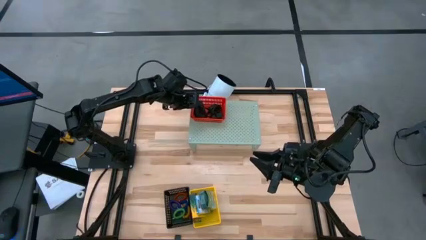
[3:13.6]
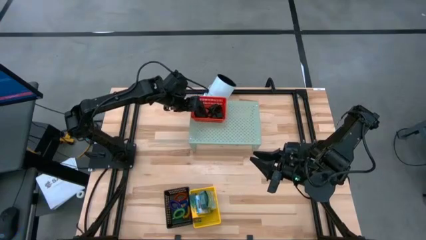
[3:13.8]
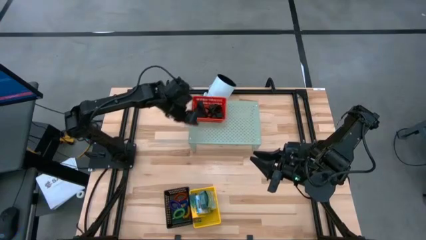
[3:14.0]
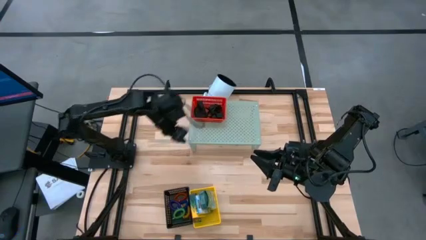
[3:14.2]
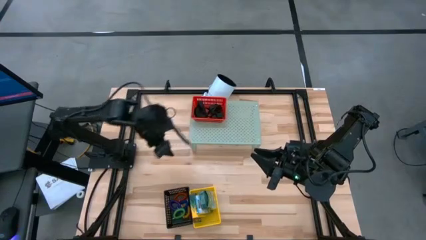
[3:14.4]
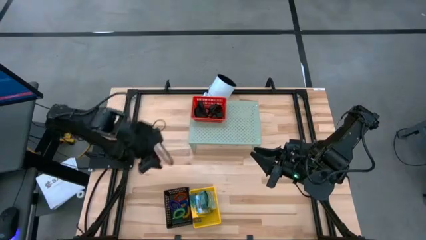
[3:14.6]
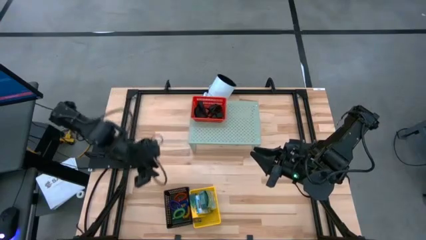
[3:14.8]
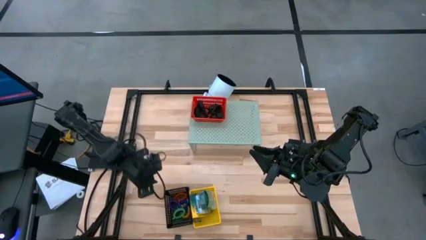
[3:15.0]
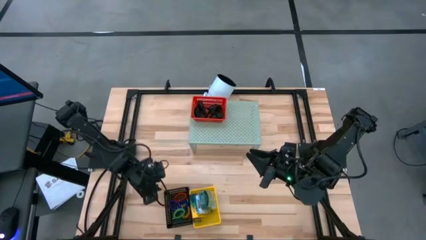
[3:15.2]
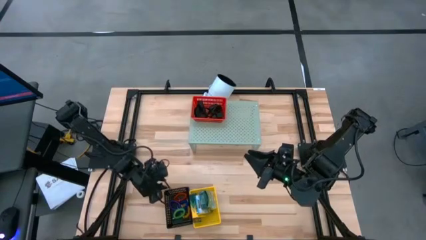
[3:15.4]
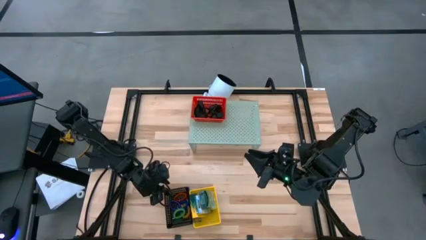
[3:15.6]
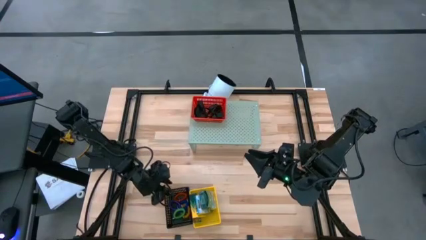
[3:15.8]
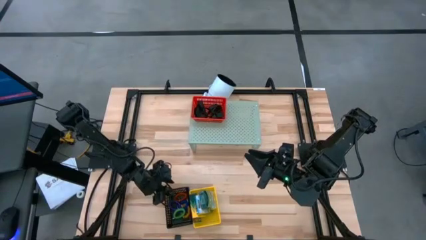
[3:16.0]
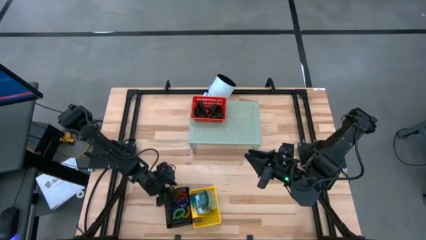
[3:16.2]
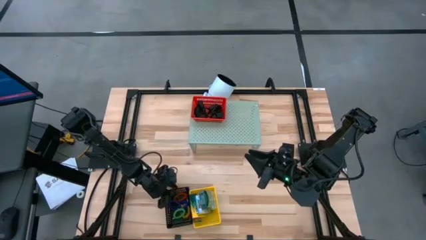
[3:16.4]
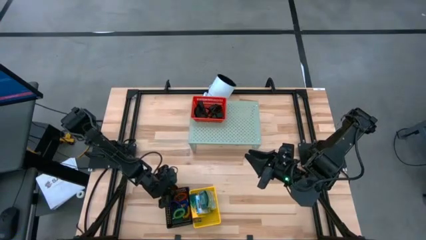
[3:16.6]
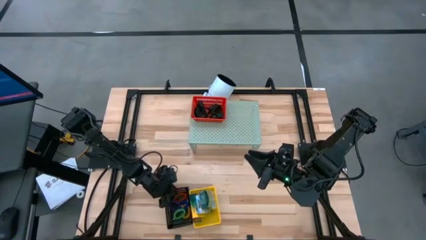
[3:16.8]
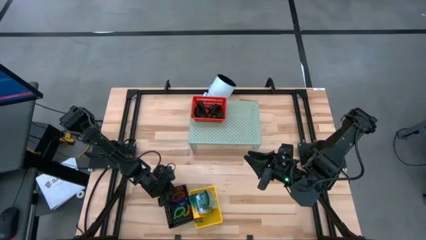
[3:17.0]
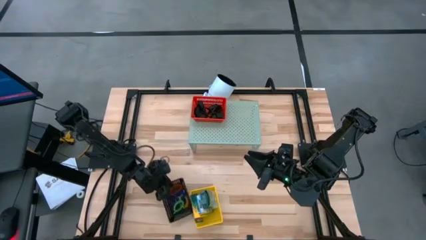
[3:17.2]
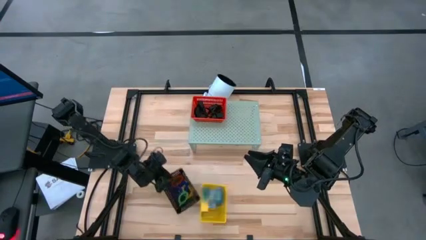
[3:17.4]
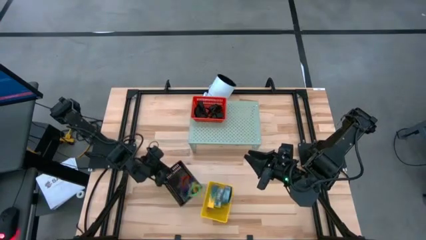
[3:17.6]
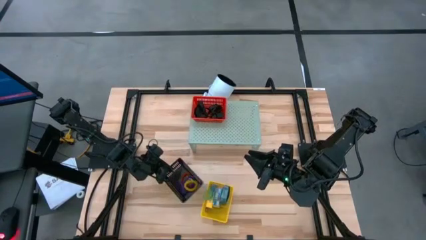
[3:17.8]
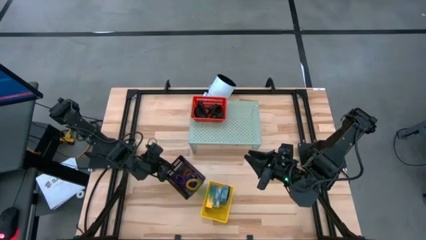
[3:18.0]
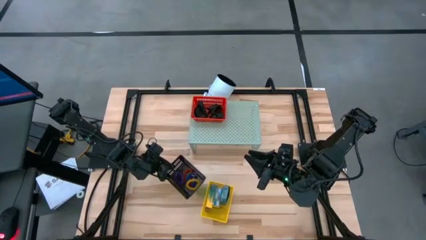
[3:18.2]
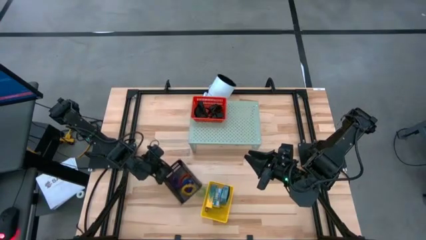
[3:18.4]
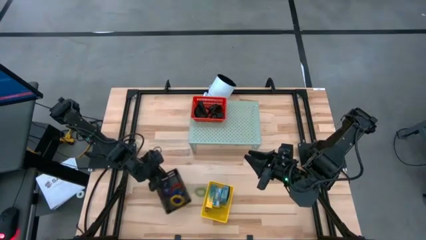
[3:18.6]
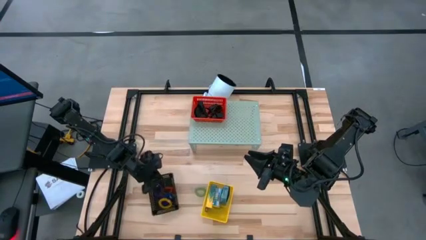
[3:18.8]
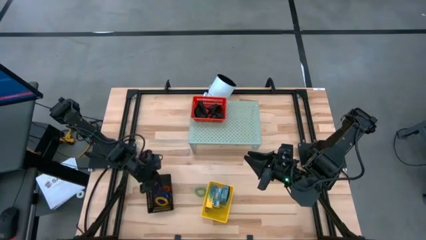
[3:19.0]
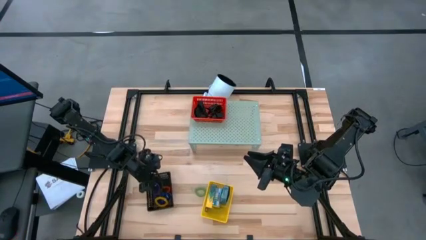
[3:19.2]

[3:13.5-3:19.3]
Task: Pick & Place Office Desk Supplies
Put the black bin on the shelf

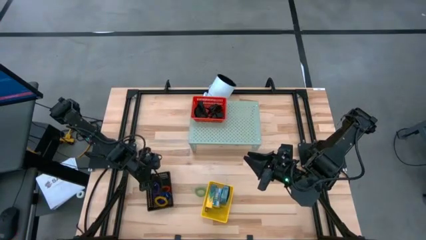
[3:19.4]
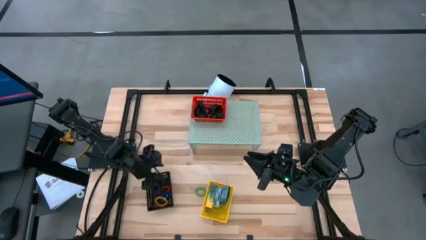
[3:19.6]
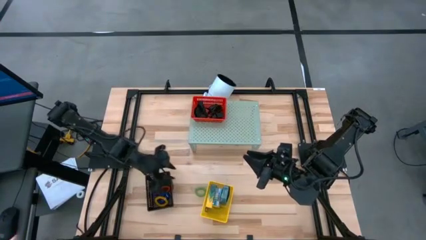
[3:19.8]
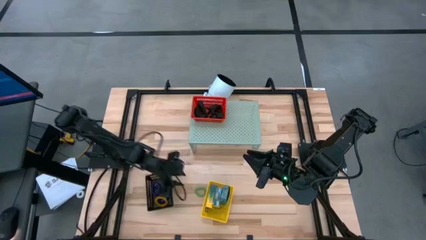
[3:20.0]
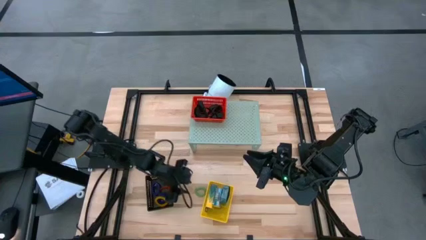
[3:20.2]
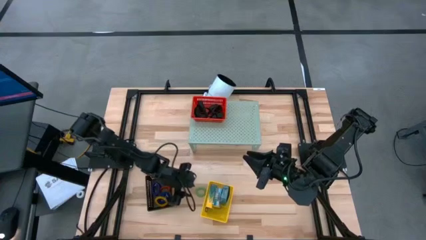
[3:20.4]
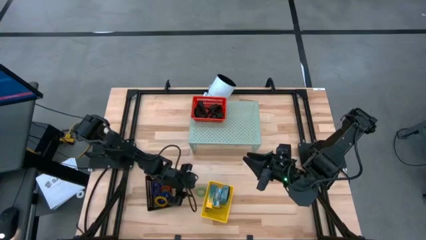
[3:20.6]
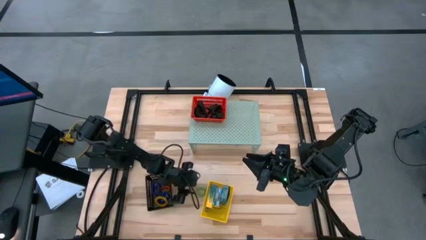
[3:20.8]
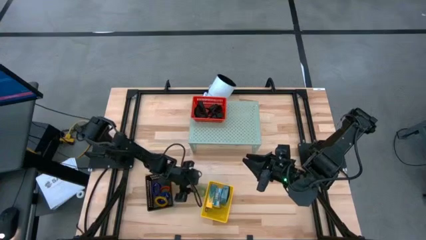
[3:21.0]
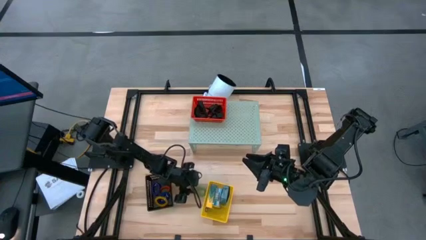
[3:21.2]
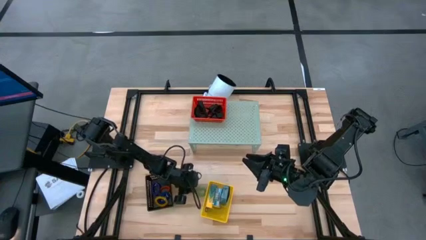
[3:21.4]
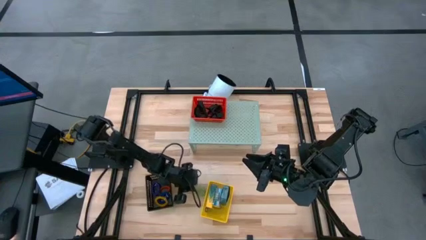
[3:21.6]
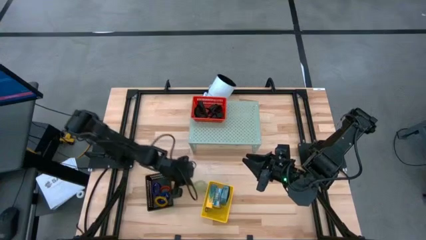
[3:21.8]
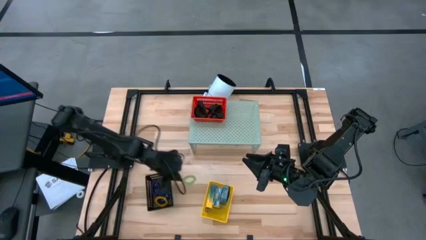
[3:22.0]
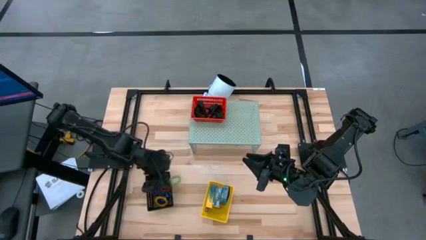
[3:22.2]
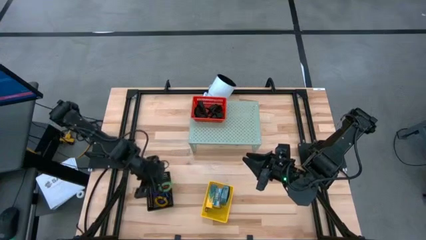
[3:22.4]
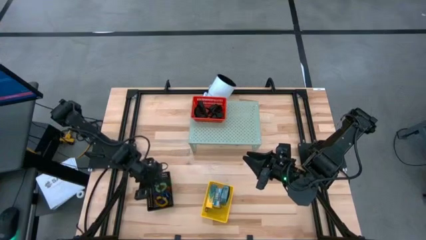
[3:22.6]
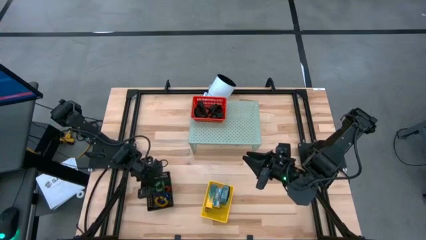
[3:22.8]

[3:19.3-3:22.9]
Put the green spring keychain into the black bin

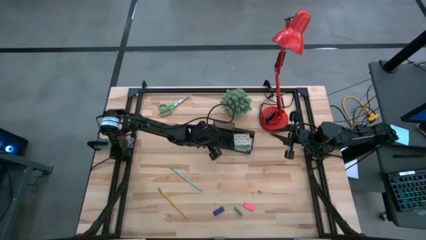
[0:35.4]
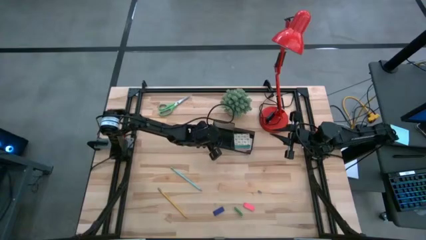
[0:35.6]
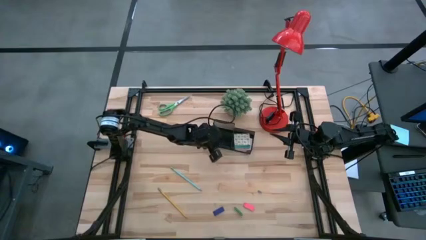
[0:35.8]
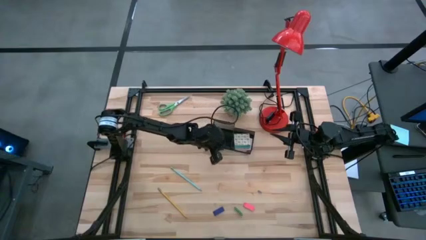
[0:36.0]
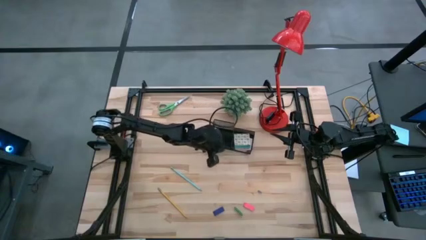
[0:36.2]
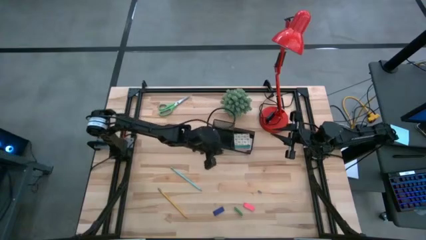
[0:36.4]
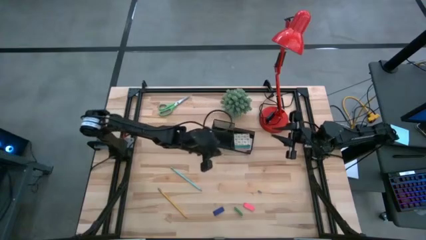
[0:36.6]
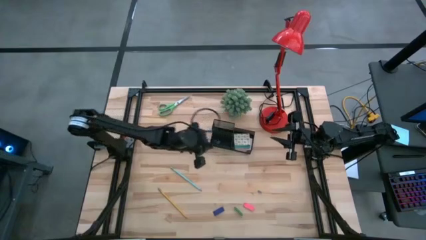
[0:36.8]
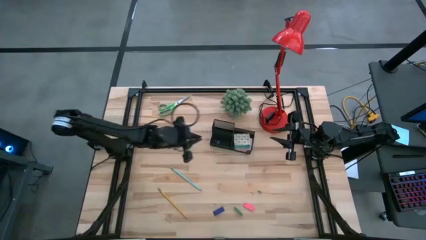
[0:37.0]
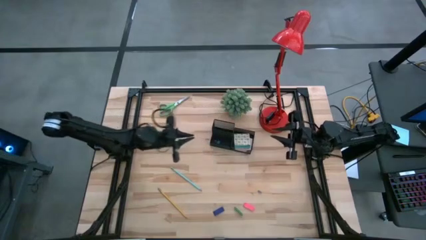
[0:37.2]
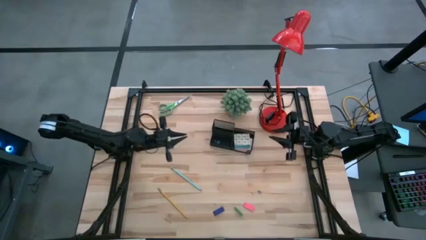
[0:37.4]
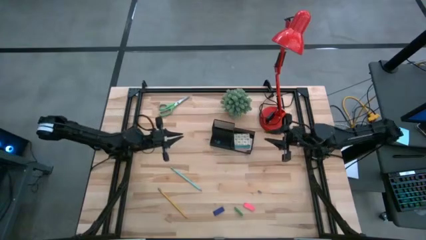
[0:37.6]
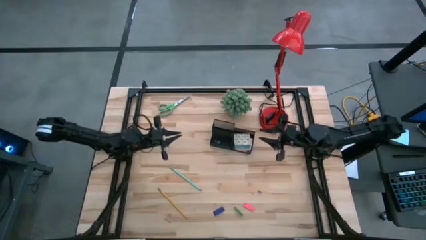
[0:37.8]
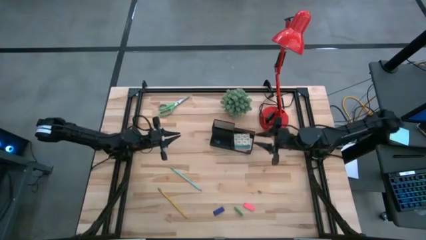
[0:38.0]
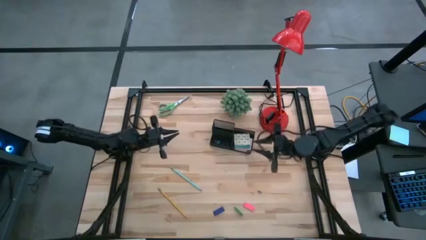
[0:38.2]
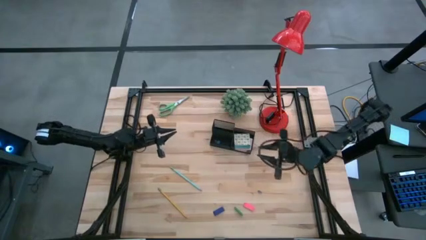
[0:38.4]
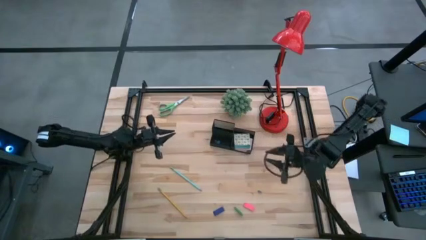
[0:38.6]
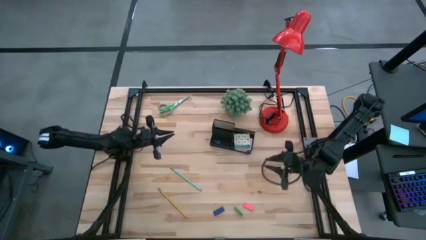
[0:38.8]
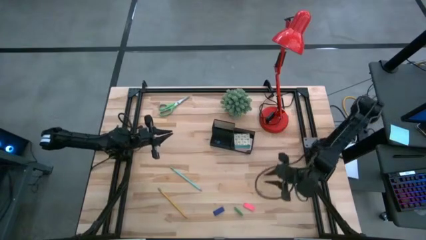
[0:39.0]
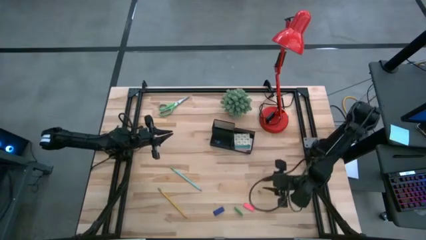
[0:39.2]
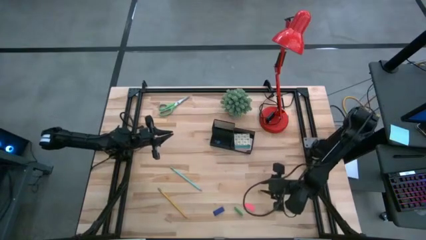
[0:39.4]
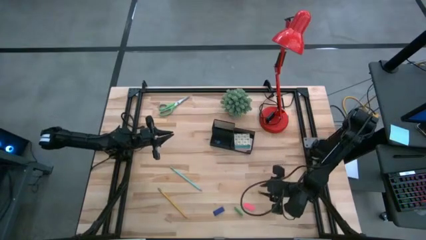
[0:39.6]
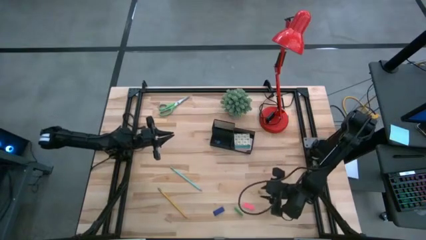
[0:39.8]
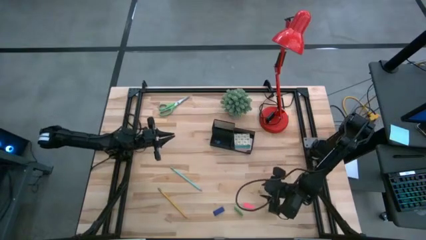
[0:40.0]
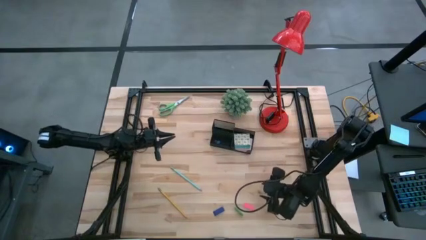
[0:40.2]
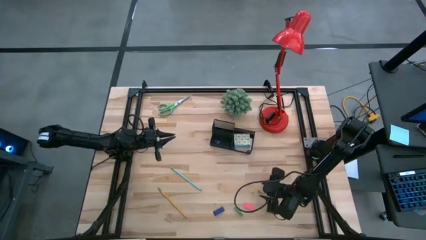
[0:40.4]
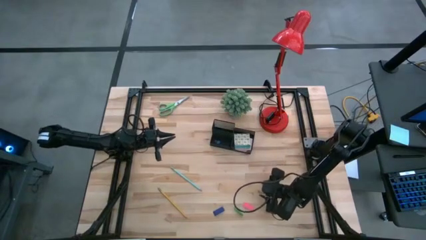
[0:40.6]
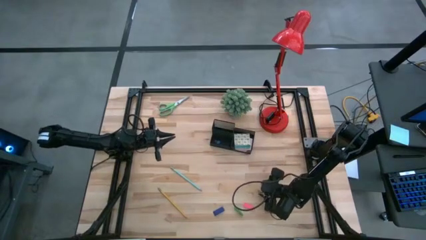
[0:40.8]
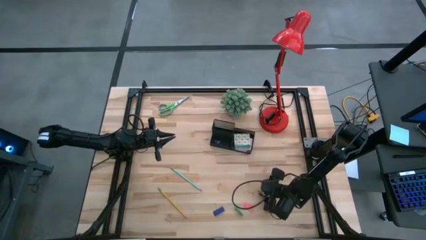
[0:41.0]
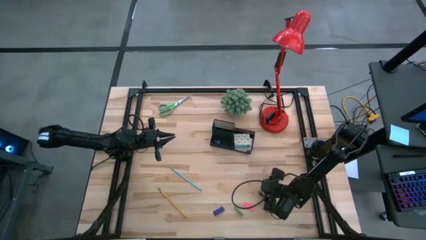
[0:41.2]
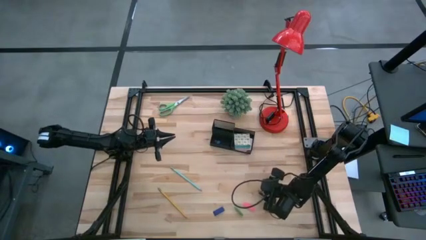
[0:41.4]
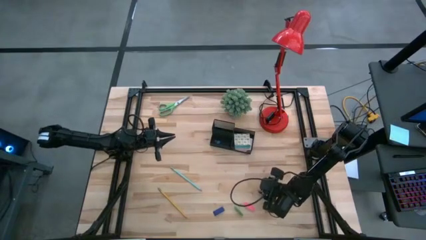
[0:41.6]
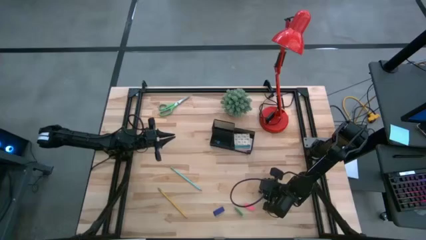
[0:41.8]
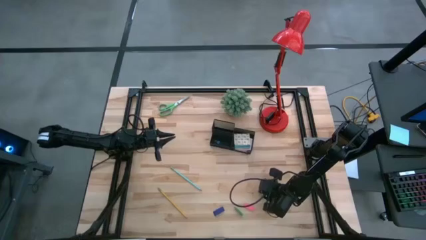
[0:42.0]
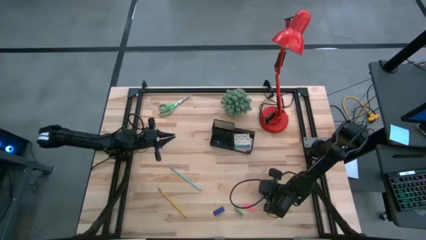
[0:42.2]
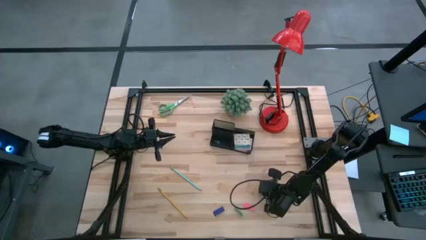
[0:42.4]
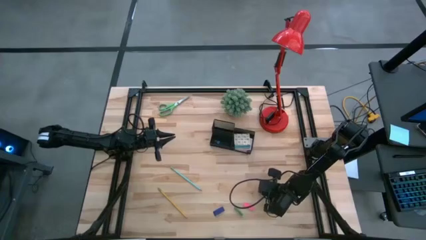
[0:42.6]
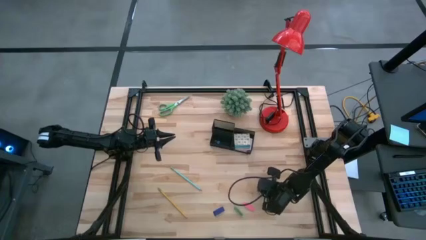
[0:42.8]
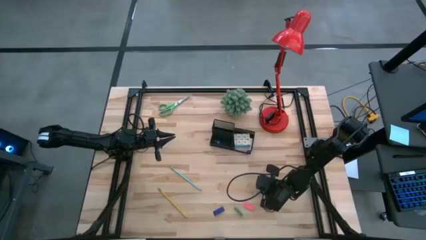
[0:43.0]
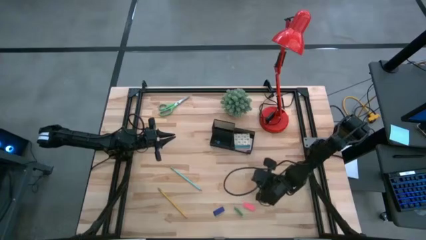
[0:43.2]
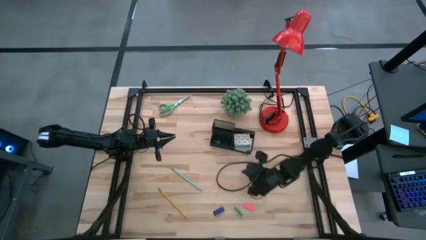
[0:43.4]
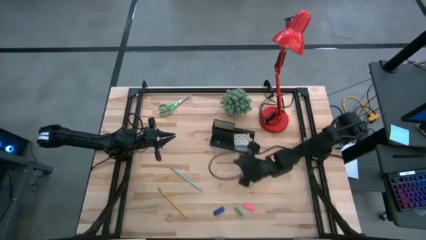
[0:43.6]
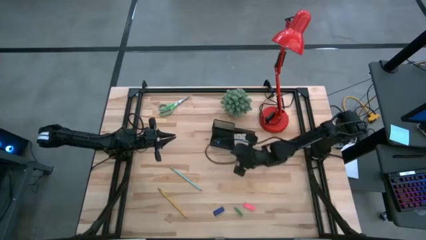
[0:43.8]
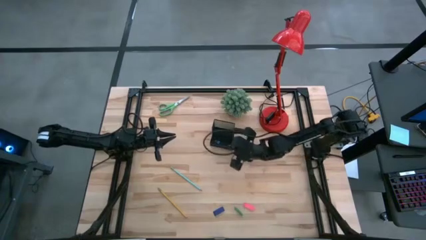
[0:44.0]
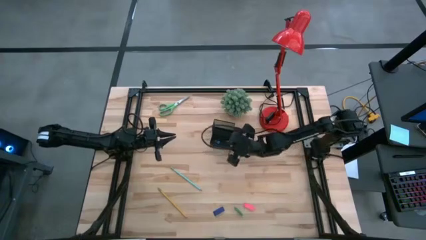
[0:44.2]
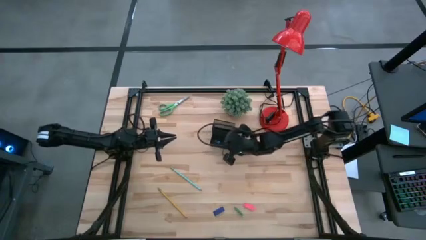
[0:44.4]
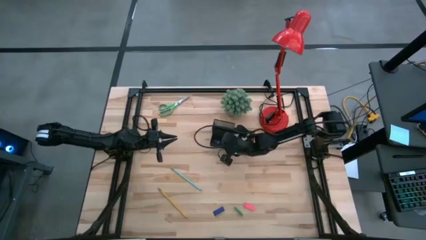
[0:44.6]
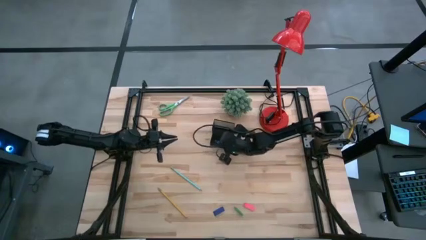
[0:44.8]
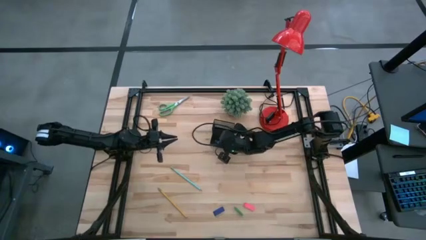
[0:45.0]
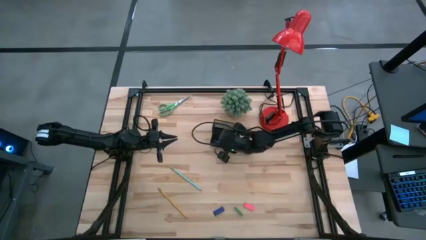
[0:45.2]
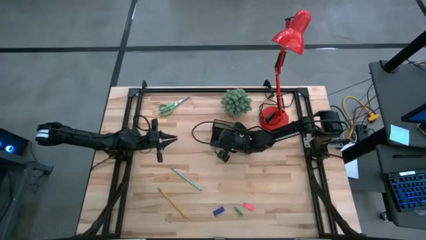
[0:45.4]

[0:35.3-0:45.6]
Task: Pick and place office supplies into organizer
Put the blue binder clip into the black desk organizer
